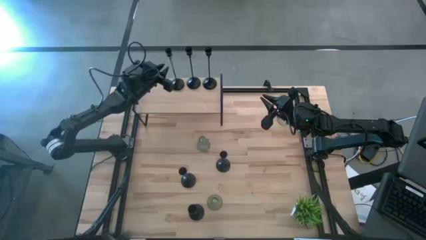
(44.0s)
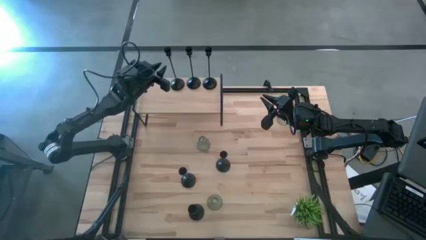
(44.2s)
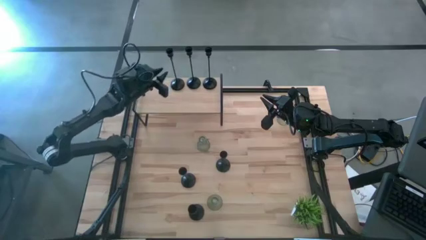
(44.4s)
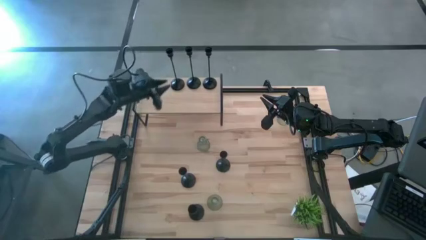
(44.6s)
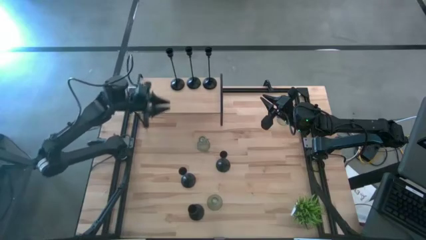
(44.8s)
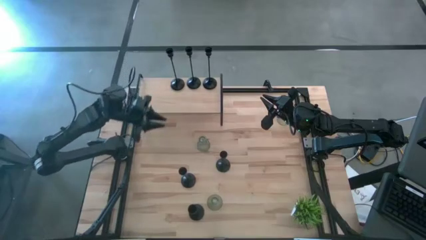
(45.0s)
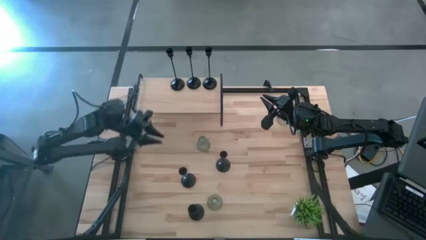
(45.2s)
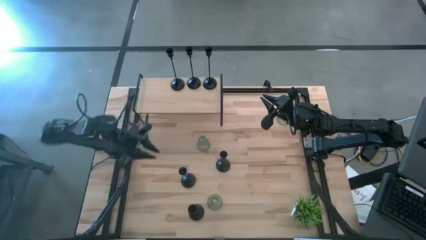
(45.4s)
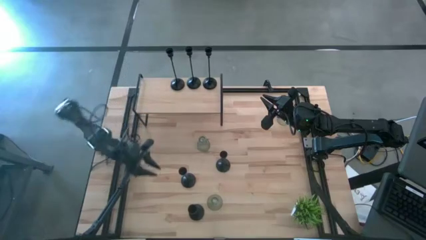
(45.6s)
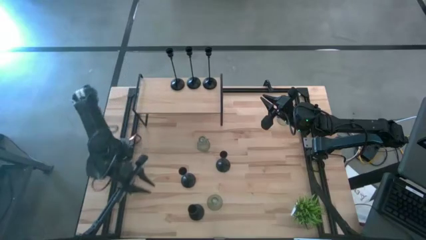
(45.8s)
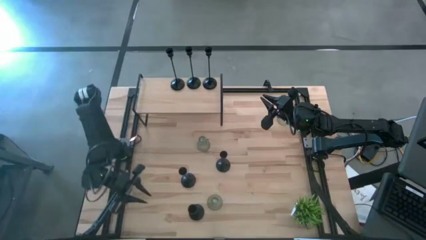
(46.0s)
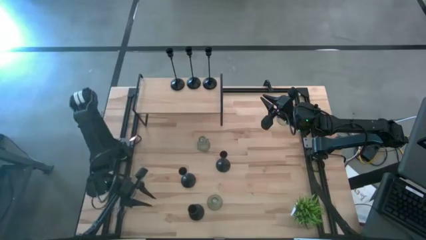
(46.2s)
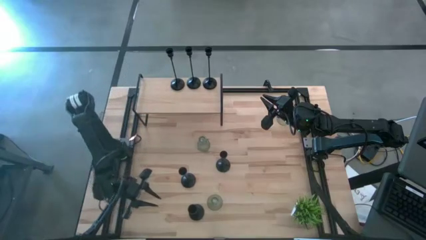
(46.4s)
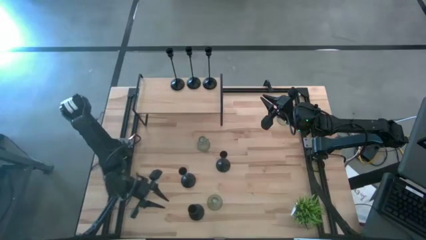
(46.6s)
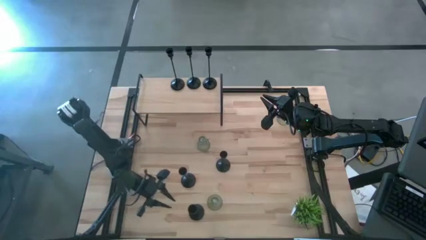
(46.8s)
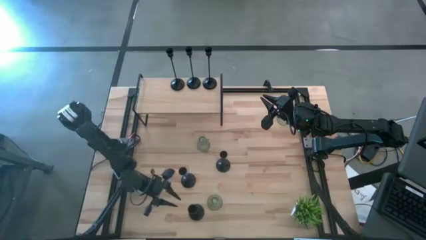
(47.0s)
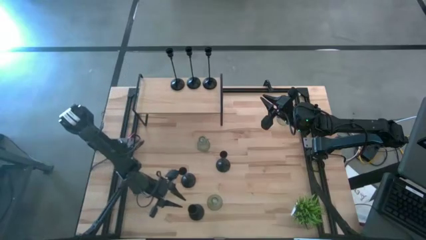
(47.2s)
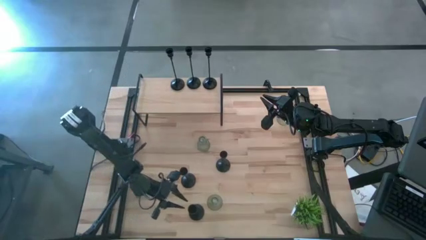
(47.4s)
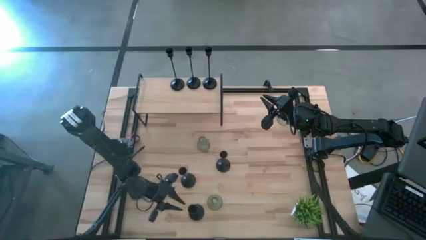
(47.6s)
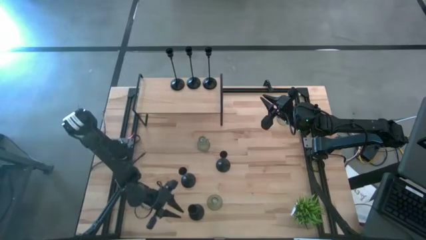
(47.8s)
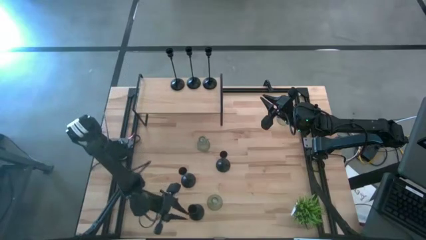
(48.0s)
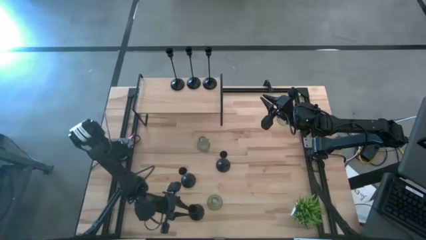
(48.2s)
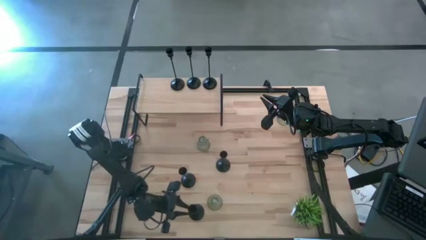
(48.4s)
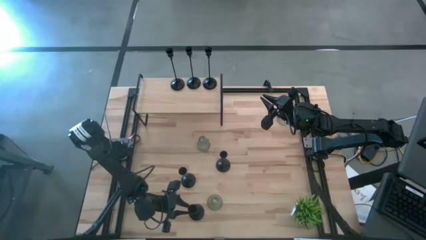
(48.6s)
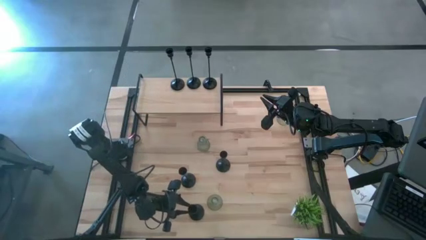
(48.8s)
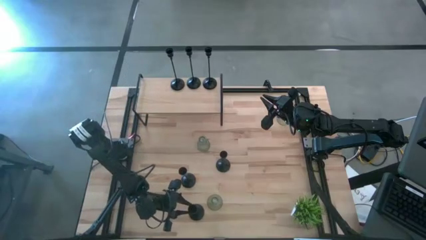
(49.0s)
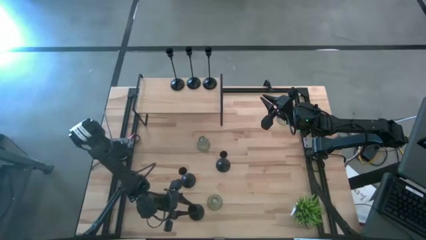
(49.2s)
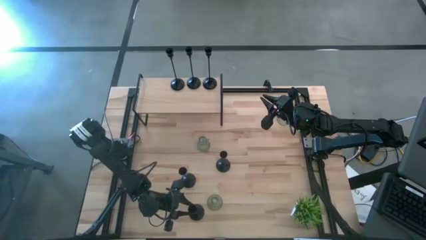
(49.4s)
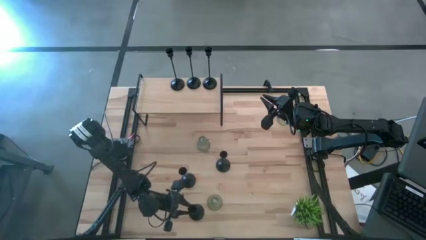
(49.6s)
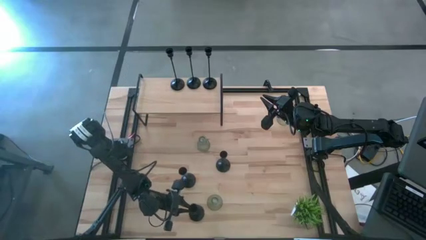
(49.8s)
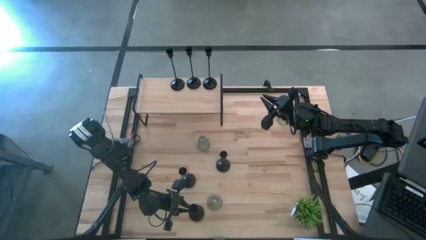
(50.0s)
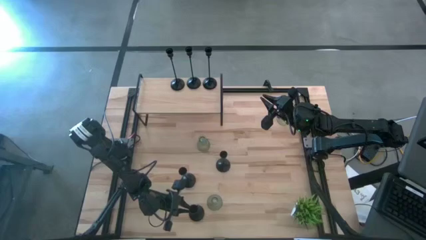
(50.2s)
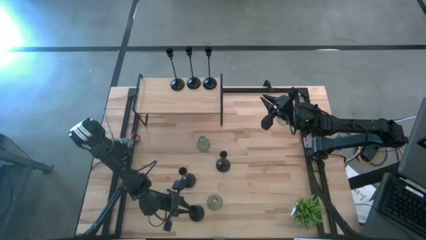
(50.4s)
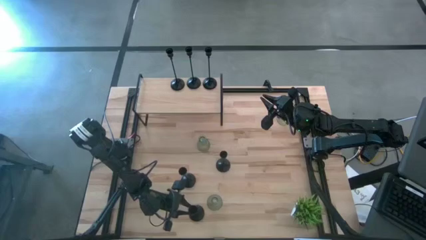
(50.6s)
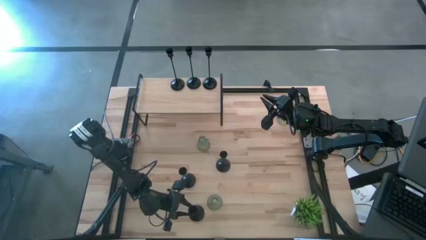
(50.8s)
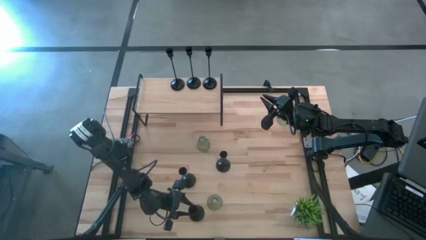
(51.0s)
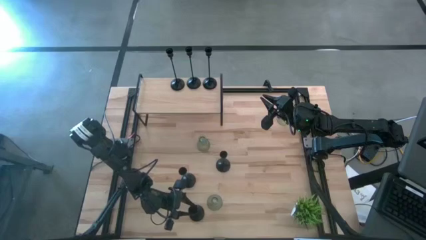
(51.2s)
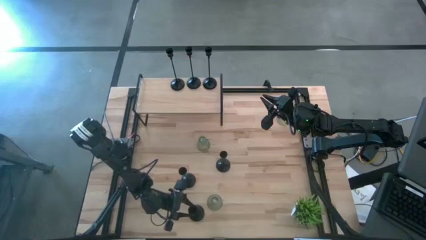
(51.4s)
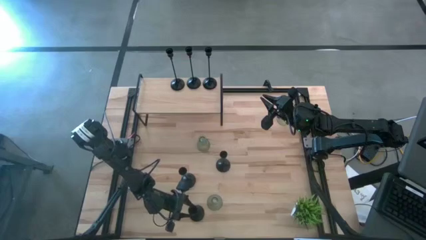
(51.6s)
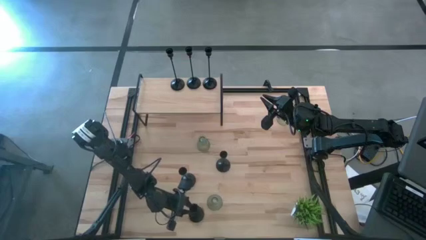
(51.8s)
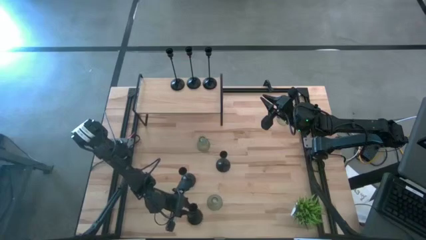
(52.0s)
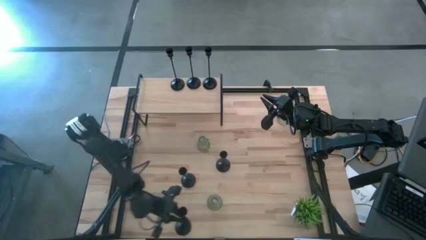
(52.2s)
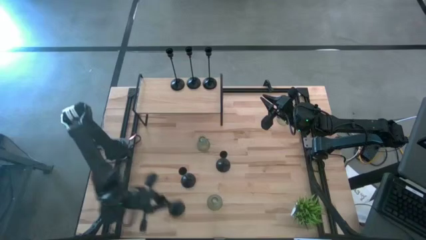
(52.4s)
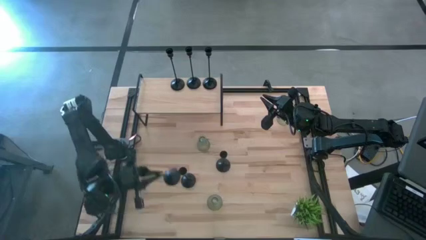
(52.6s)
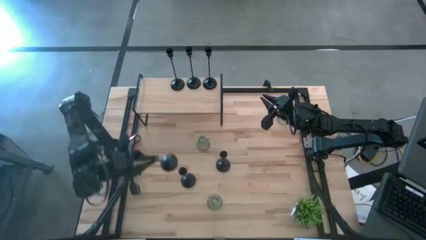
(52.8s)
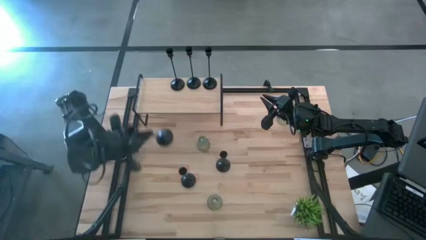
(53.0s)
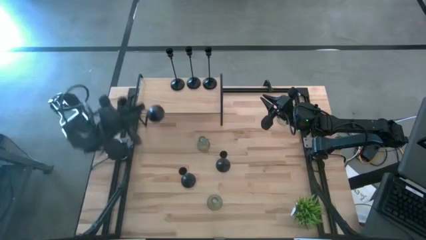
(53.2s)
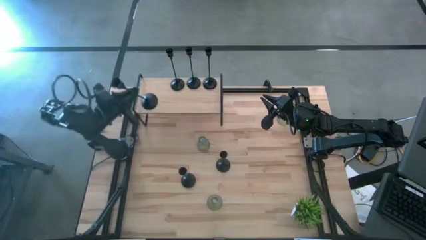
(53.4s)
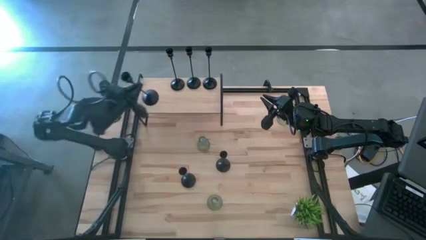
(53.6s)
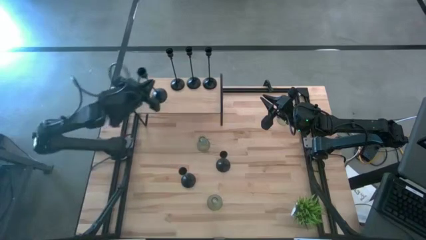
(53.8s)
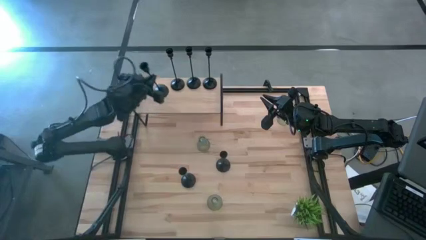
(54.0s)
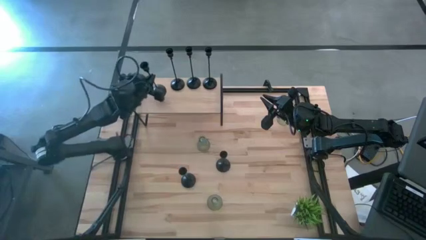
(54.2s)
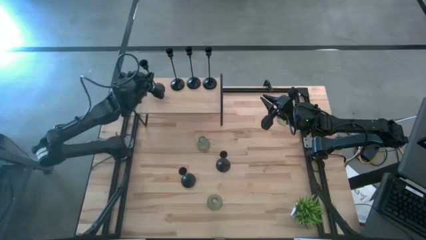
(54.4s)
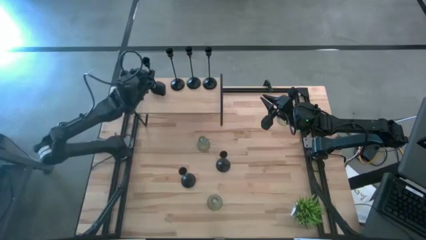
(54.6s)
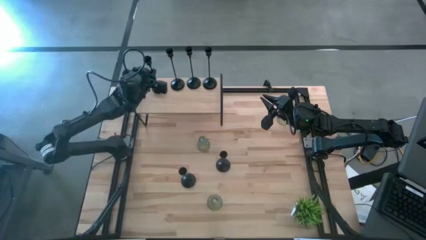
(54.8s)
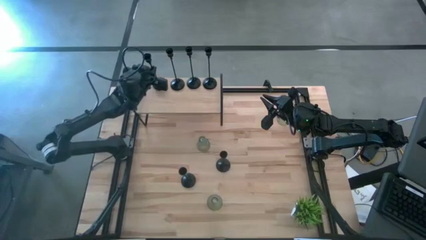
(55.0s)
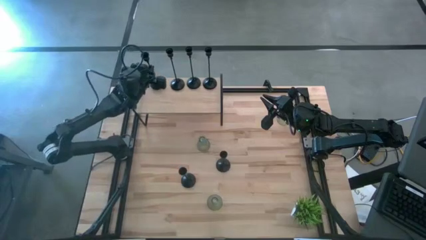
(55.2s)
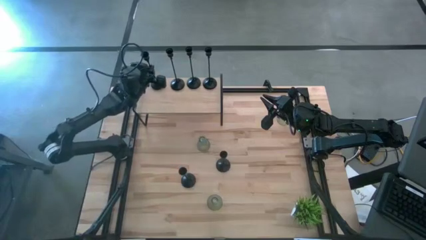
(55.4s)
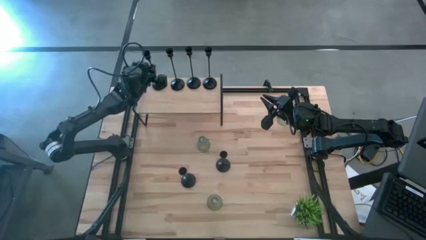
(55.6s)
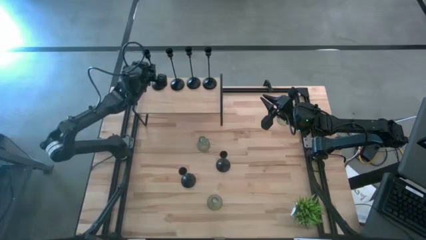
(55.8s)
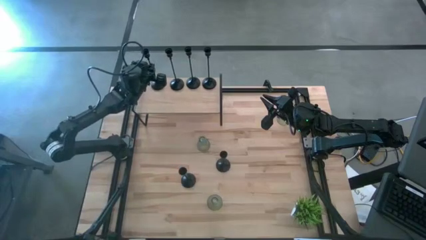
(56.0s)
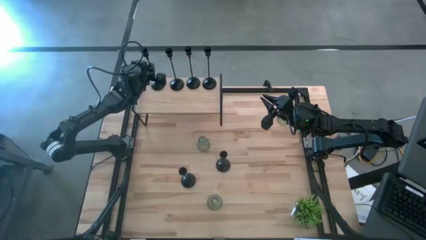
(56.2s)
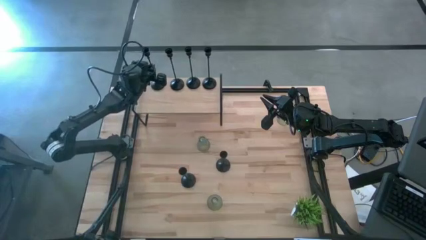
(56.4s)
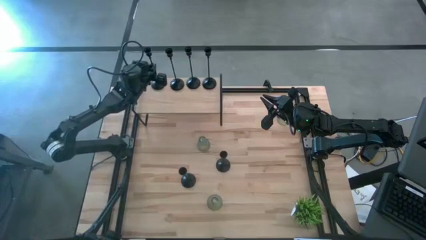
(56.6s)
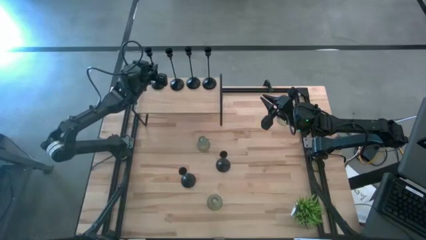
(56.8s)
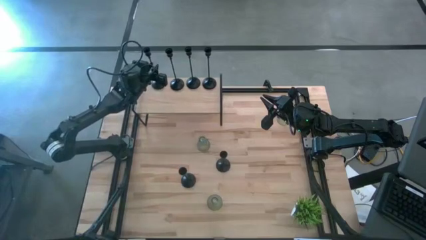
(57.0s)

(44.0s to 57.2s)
Task: Pick & Place candle stick holders
Put the black candleholder on the shelf
